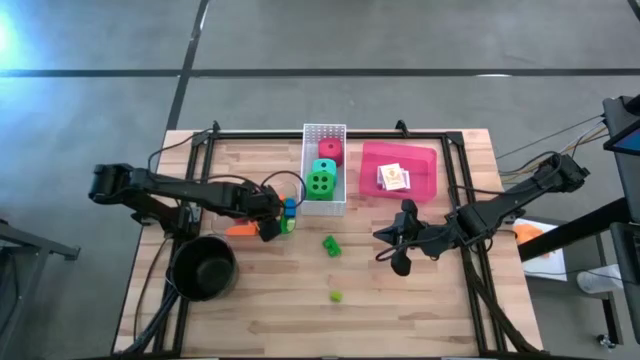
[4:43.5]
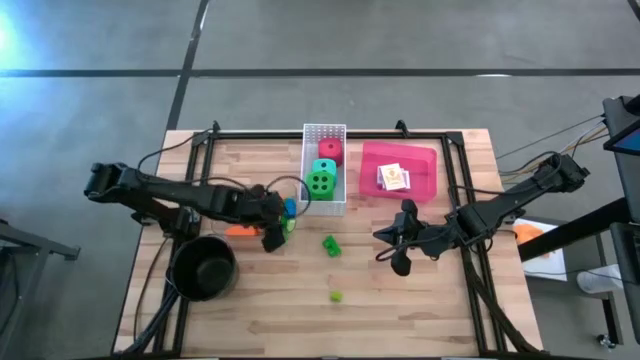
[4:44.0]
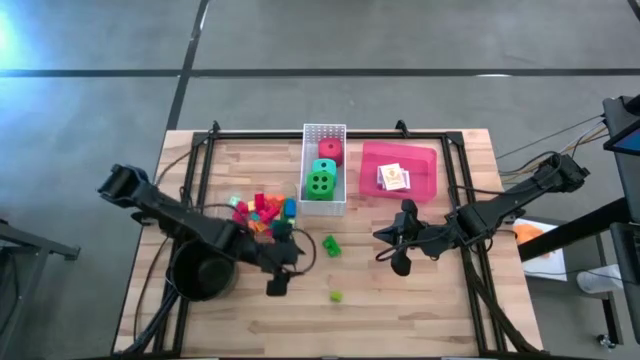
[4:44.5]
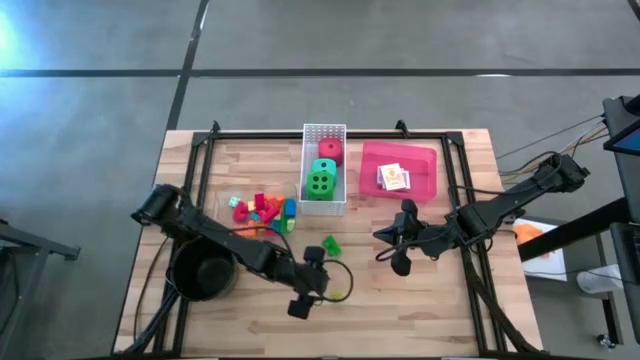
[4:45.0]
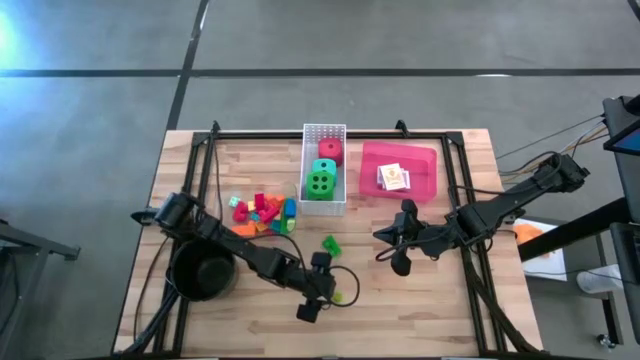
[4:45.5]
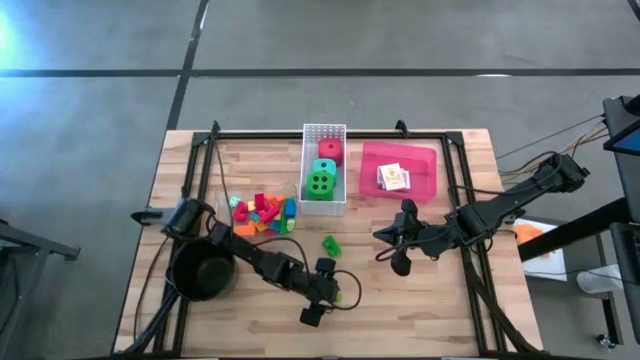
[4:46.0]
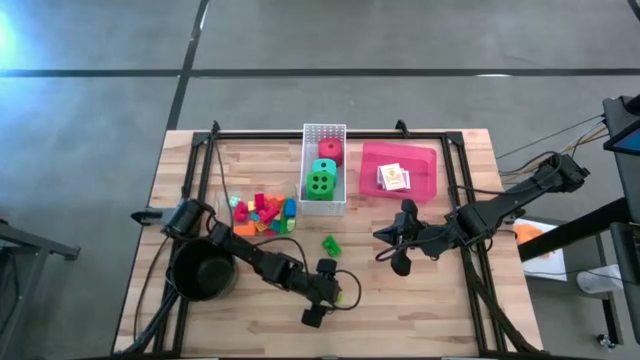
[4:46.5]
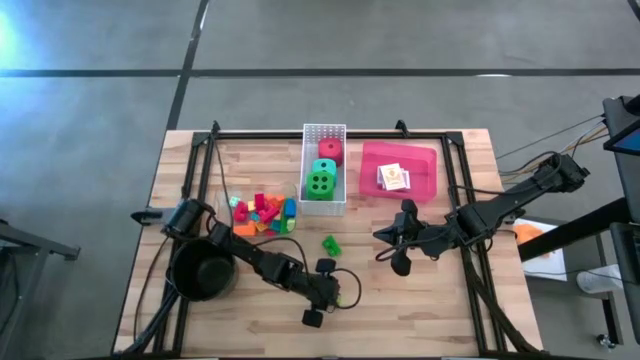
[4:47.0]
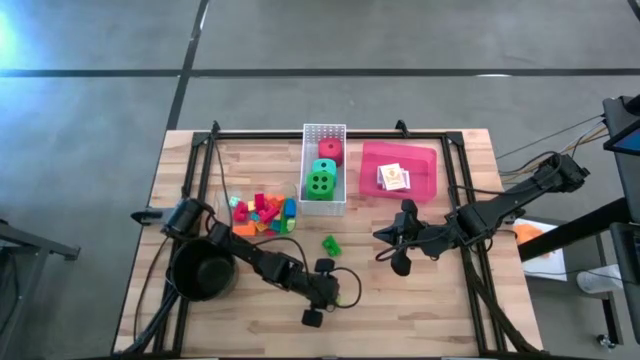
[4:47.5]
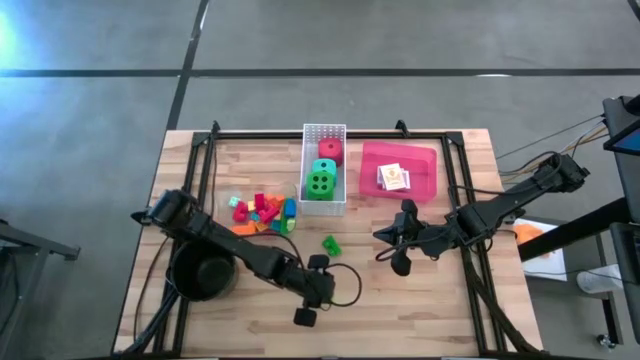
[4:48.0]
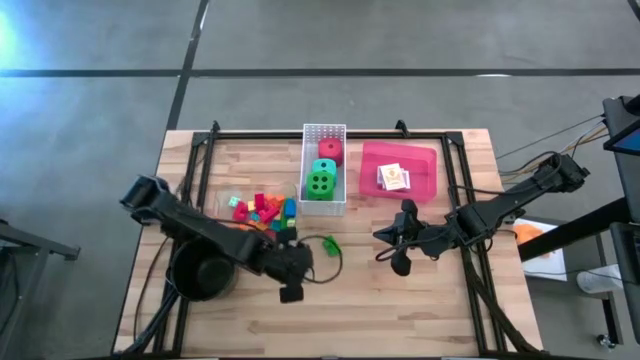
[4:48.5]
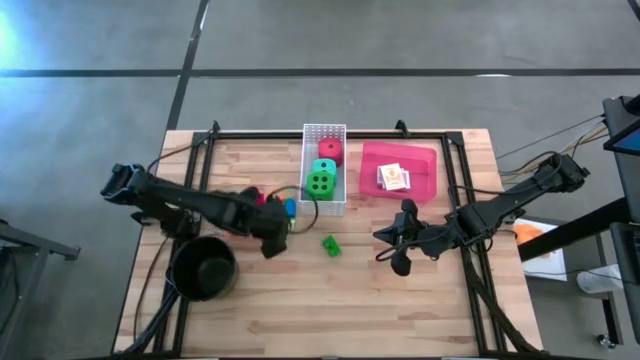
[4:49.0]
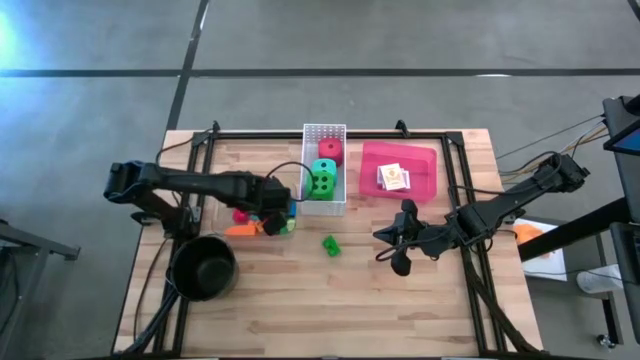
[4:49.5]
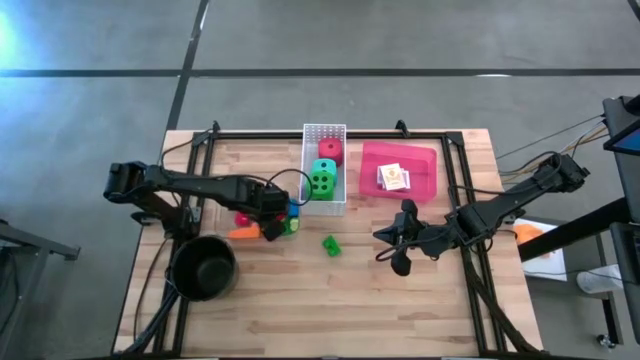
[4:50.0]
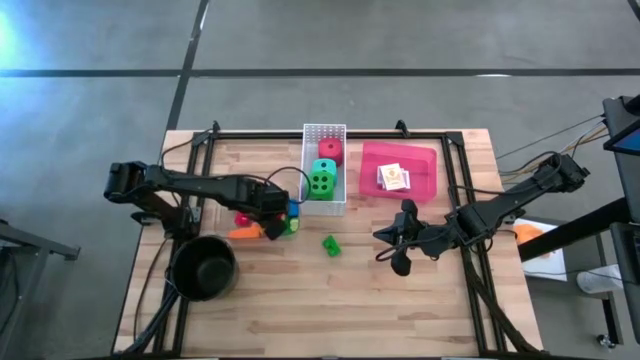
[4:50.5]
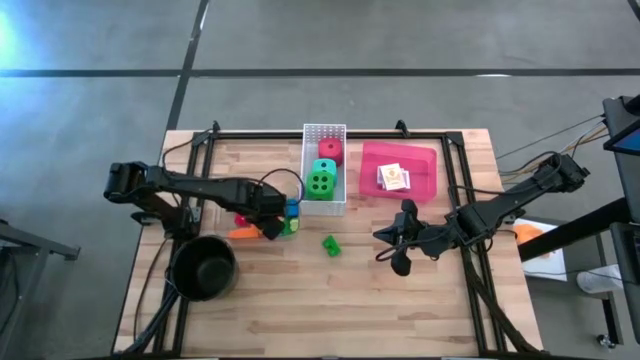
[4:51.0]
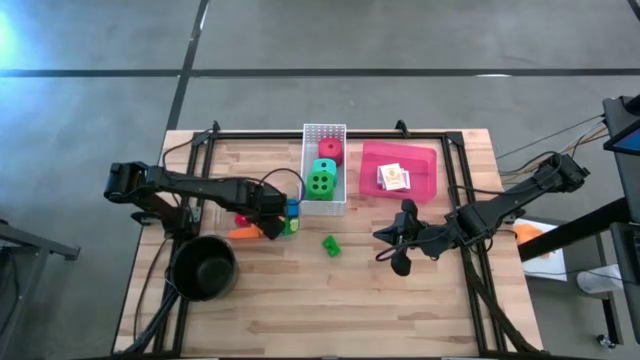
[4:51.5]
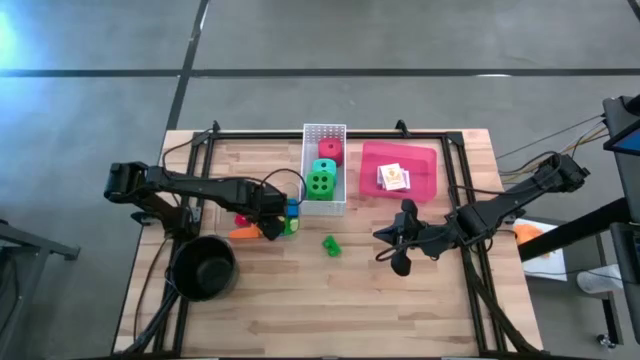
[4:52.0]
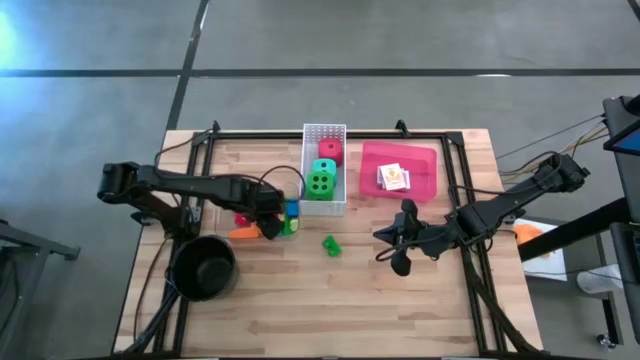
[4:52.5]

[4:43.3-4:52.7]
Task: Pick & Place Toys
Put the light green game piece into the transparent bin

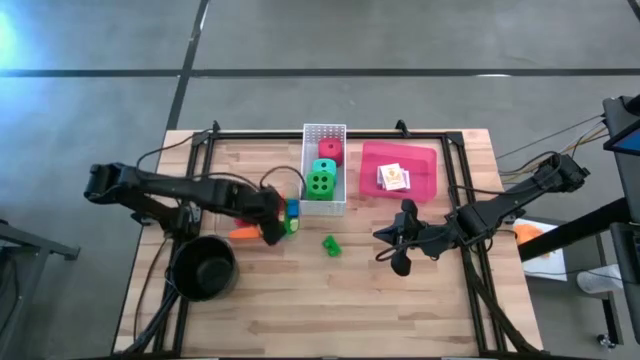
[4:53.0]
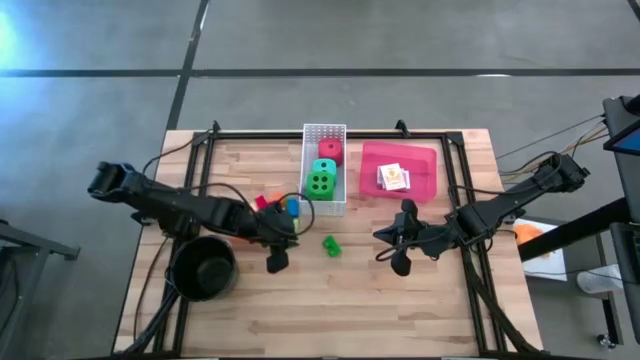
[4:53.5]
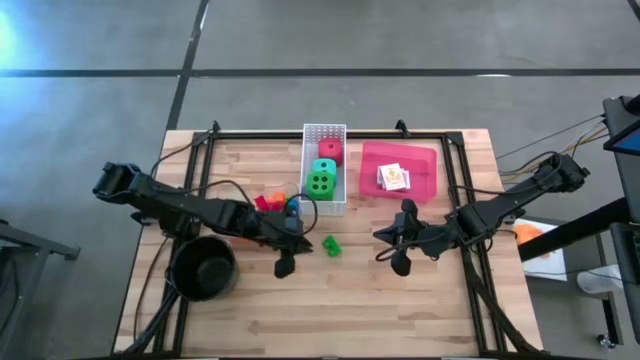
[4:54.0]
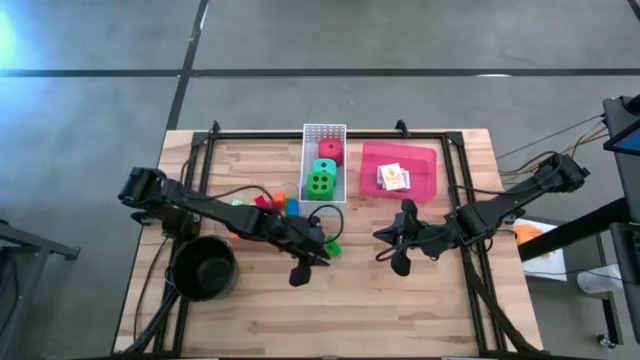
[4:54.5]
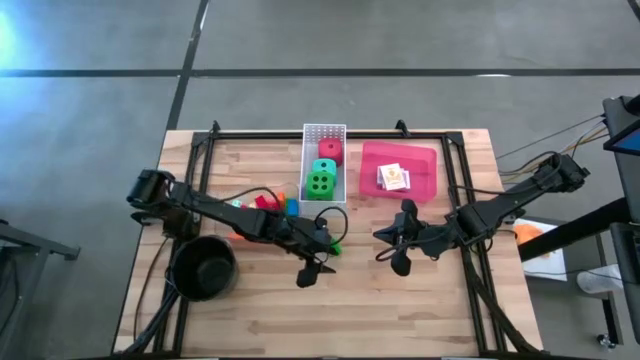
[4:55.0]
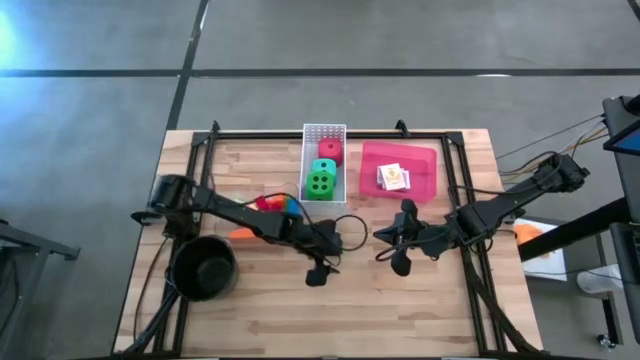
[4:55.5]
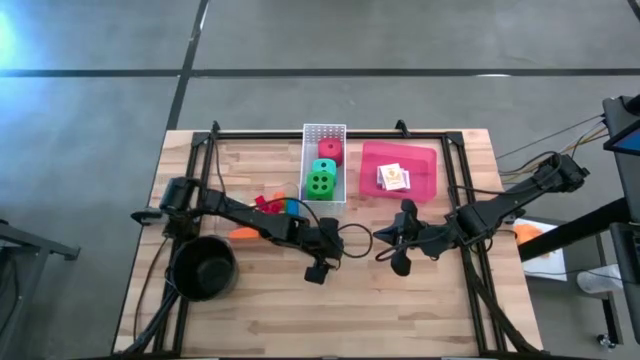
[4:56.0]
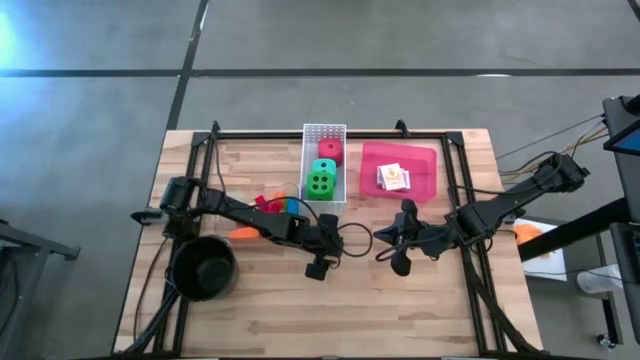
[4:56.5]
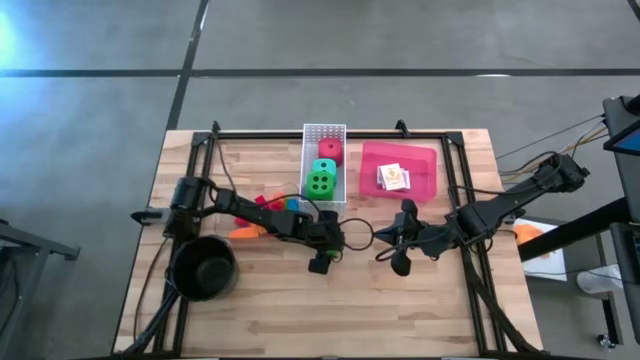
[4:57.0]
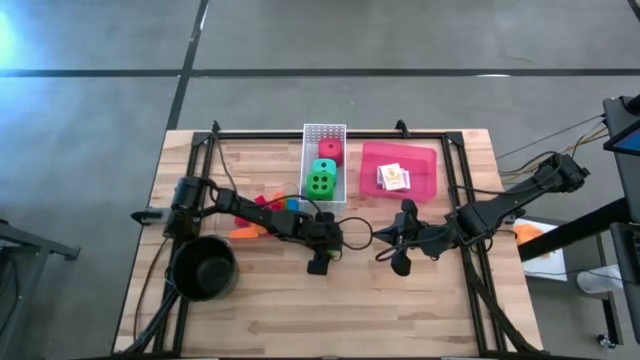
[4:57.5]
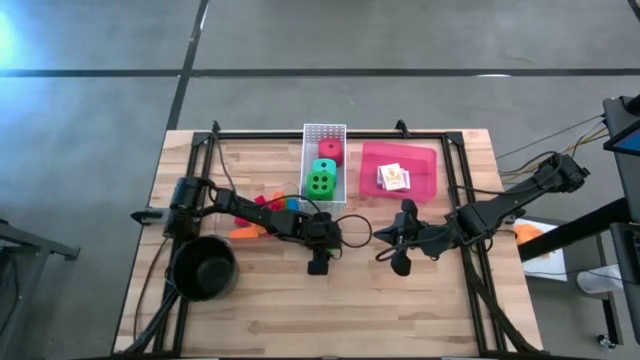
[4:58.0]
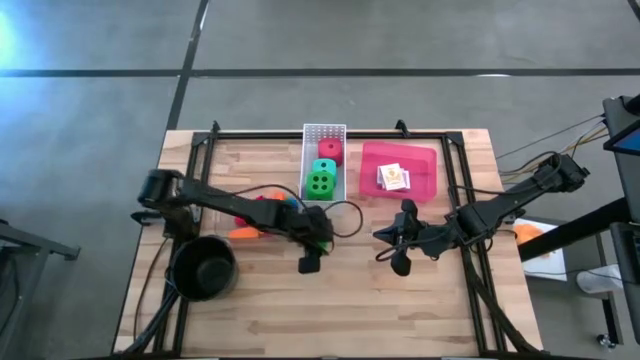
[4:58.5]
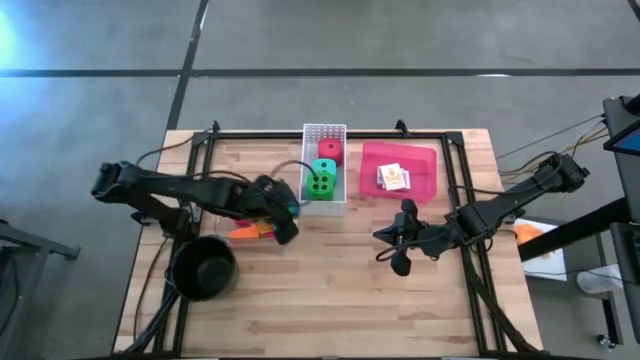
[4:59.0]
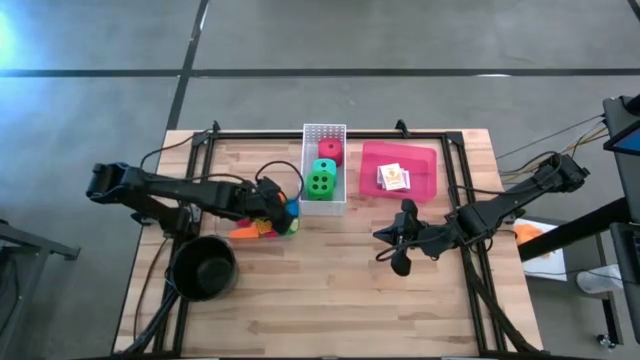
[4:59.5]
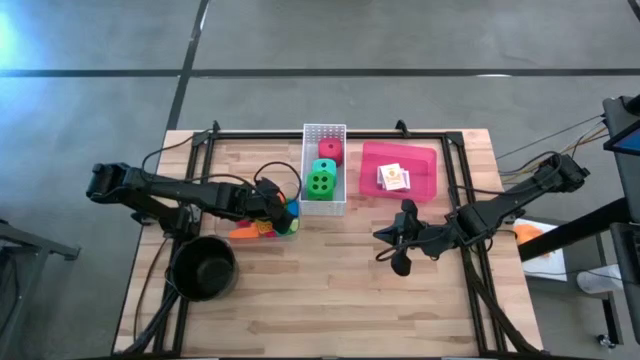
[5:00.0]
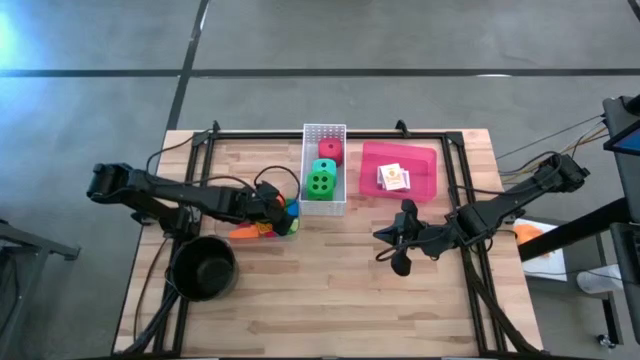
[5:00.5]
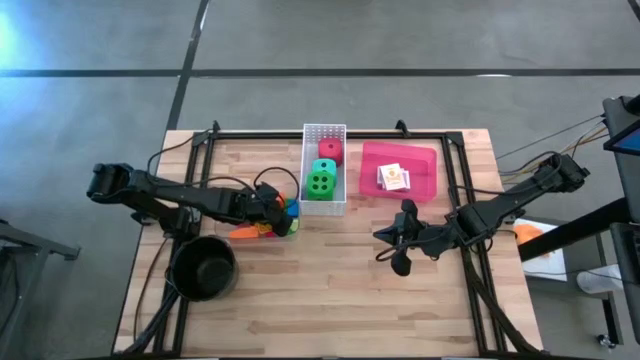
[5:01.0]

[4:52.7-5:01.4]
Put the green game piece into the transparent bin

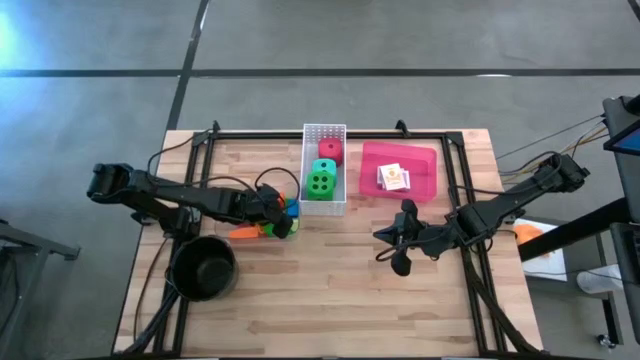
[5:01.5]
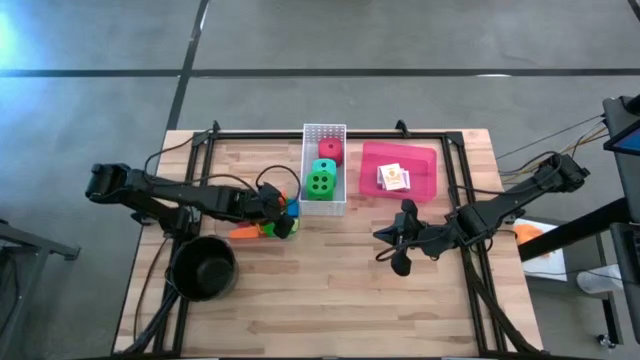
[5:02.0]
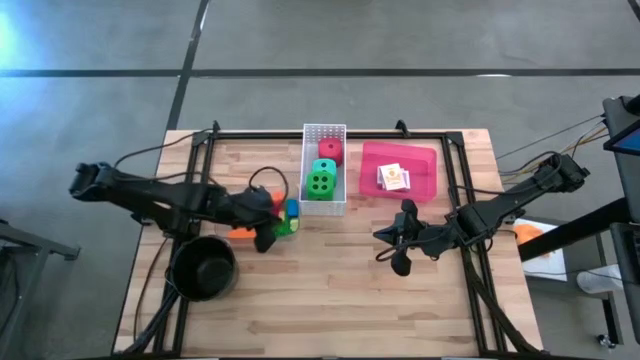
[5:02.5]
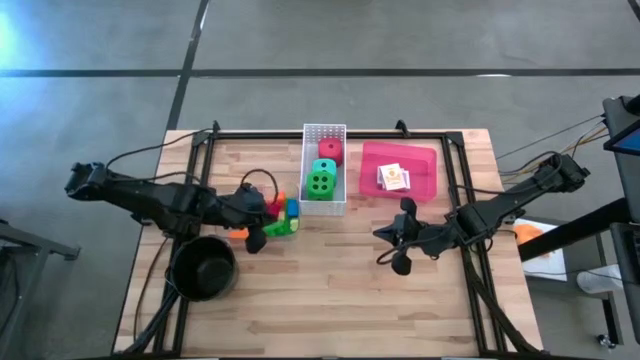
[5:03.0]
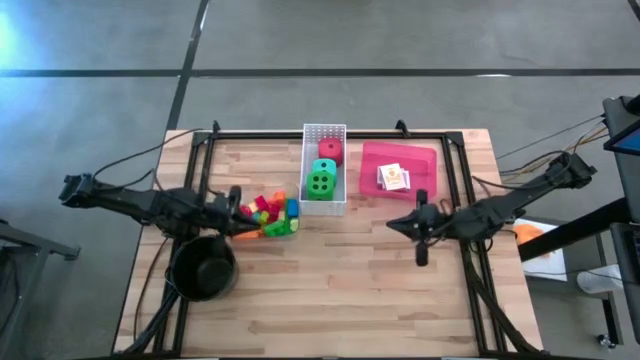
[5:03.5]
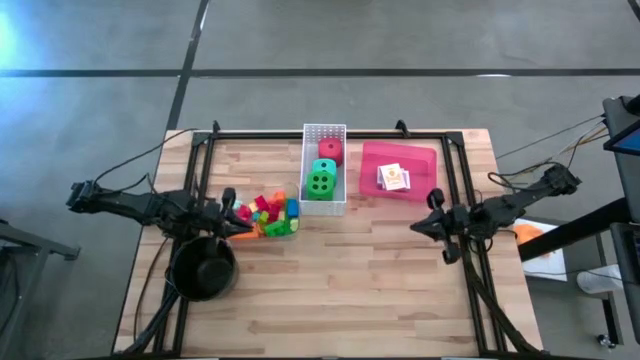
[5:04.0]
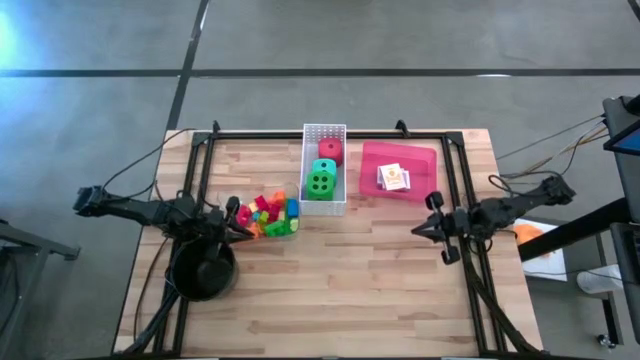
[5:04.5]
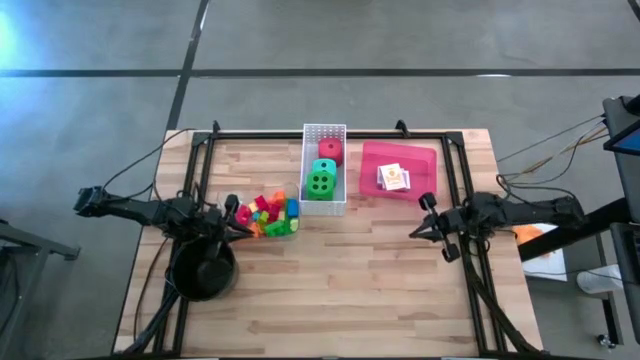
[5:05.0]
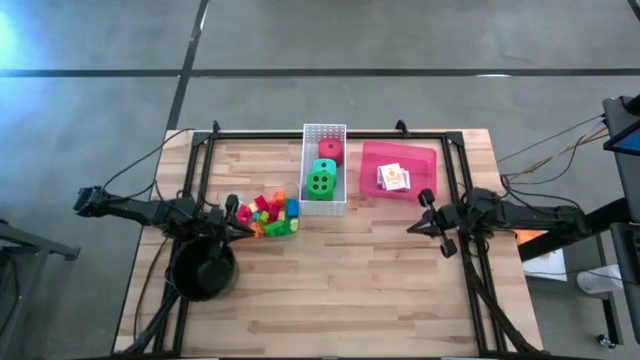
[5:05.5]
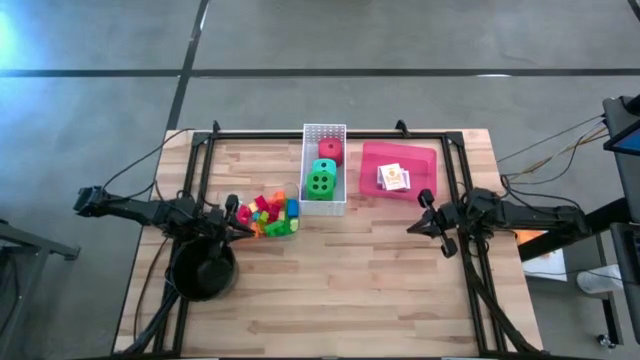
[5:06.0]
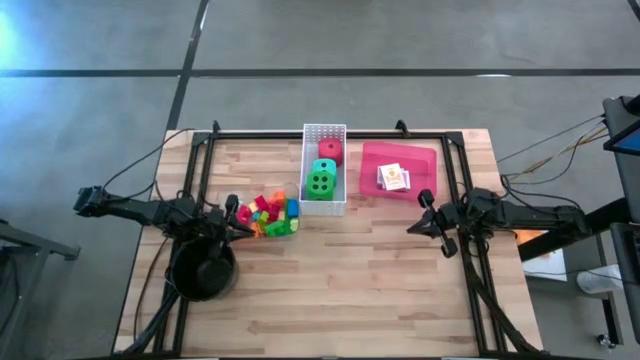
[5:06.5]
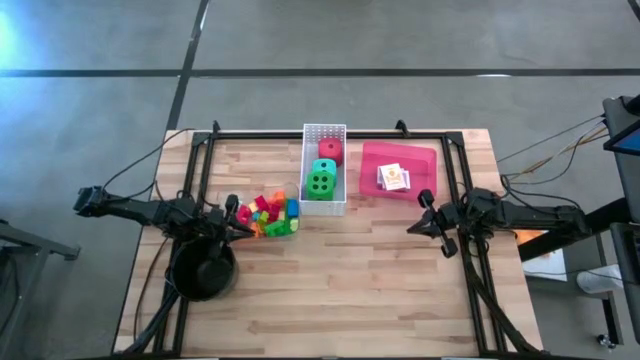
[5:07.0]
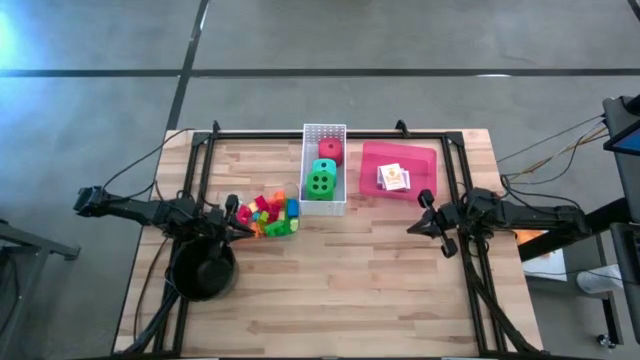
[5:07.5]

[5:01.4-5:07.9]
Return to Home Position
